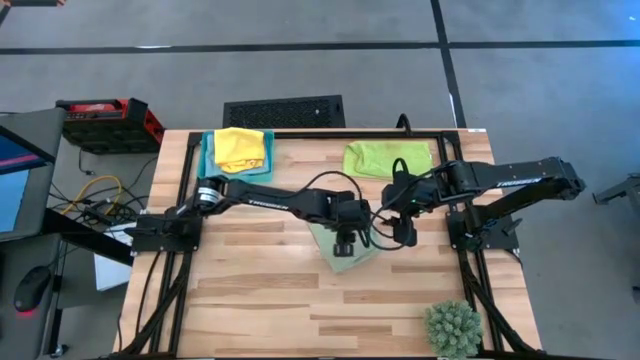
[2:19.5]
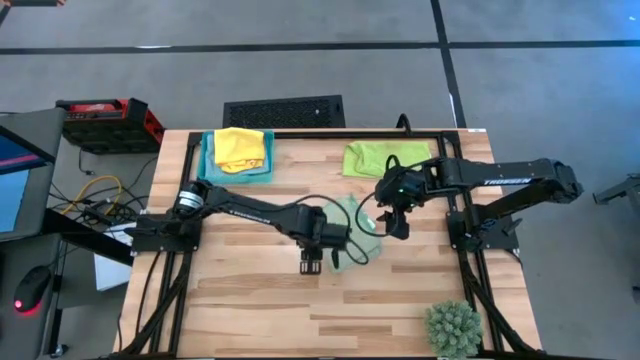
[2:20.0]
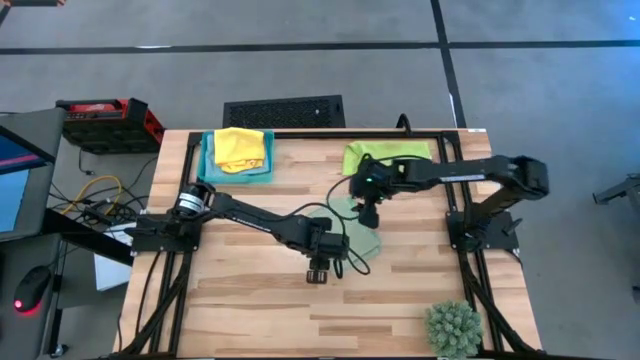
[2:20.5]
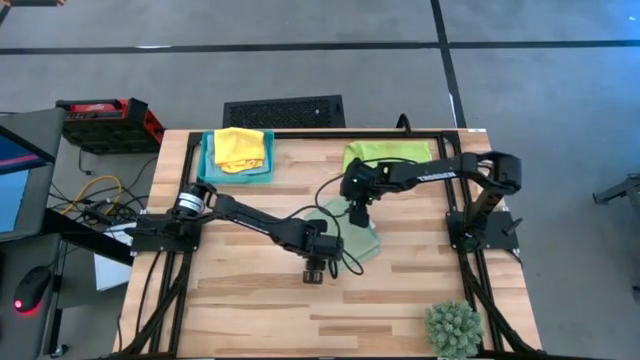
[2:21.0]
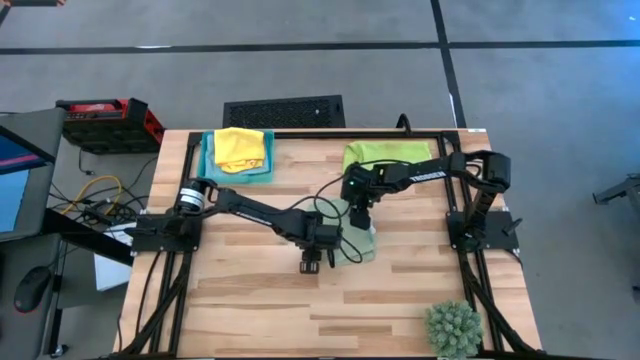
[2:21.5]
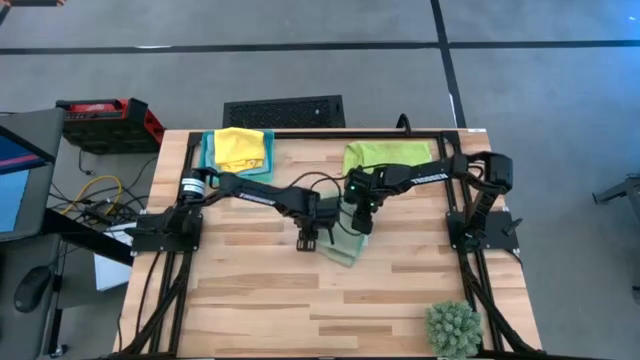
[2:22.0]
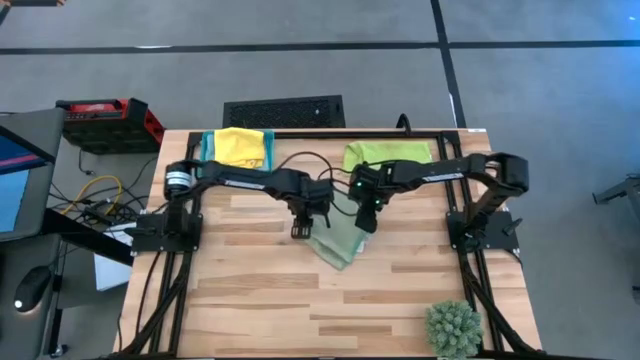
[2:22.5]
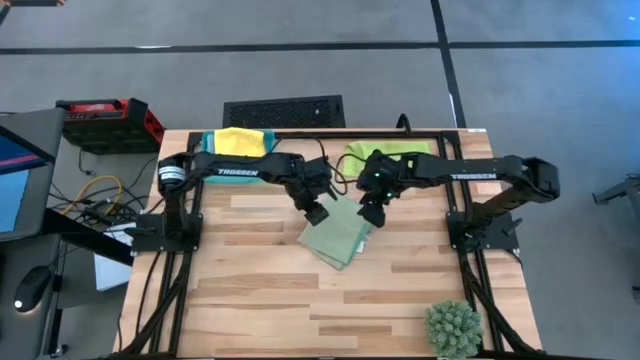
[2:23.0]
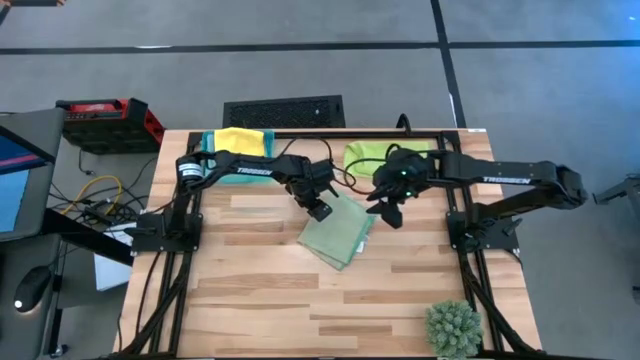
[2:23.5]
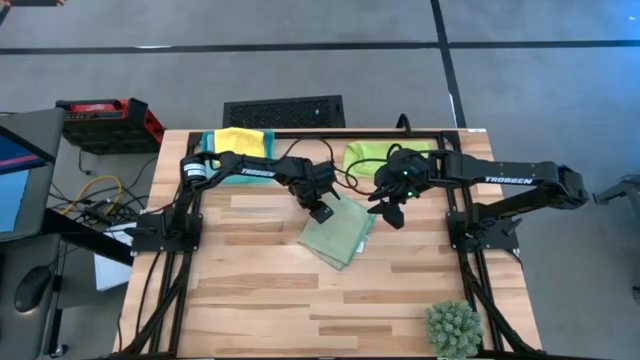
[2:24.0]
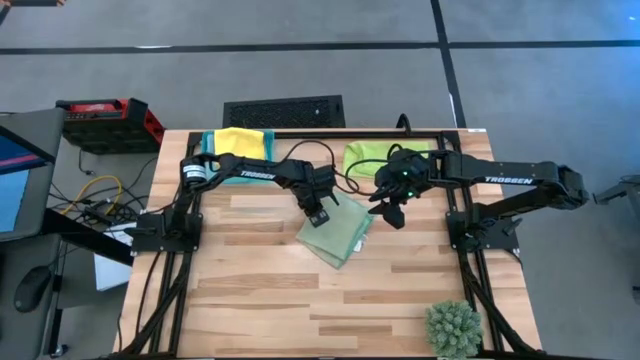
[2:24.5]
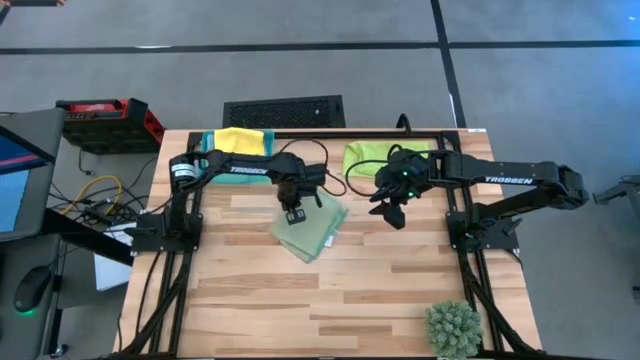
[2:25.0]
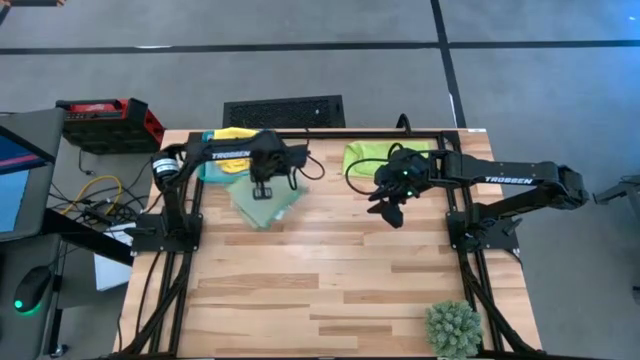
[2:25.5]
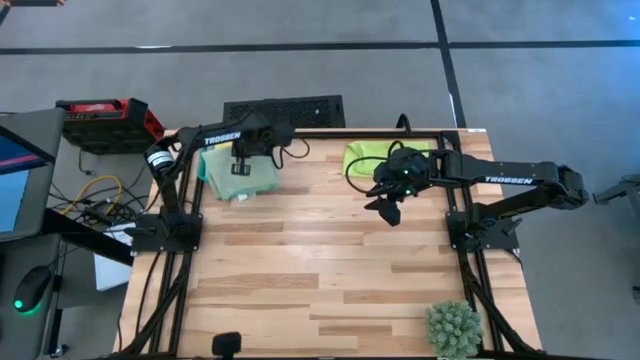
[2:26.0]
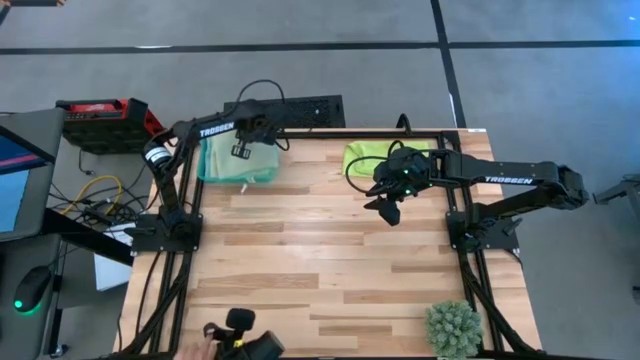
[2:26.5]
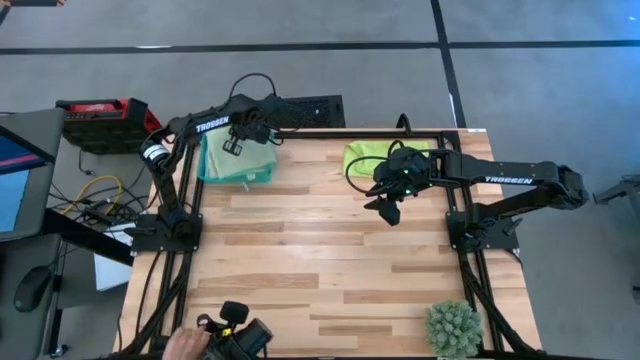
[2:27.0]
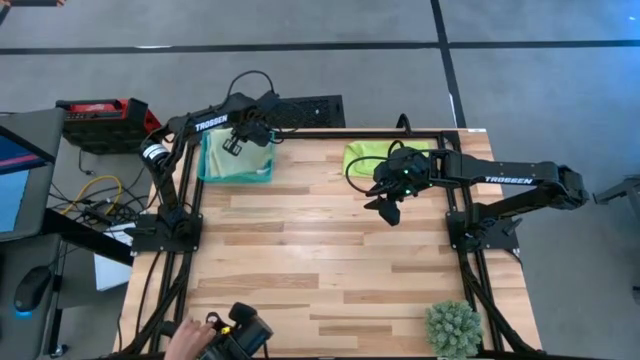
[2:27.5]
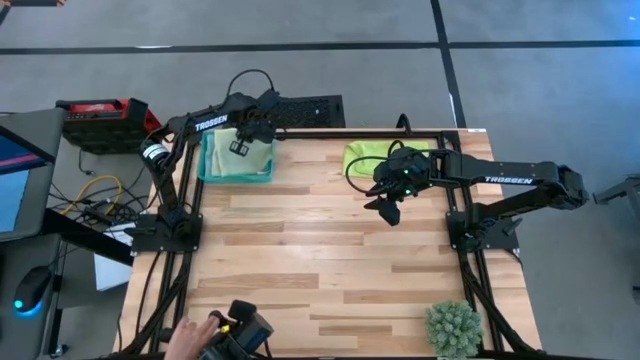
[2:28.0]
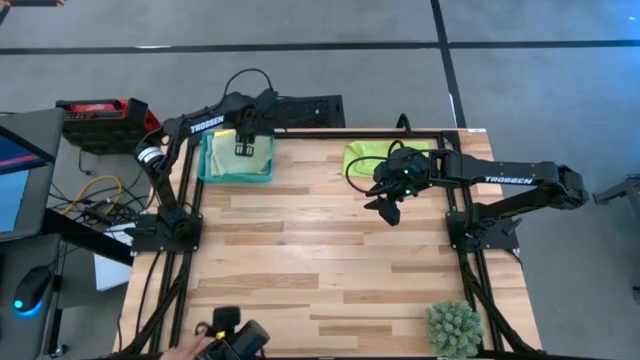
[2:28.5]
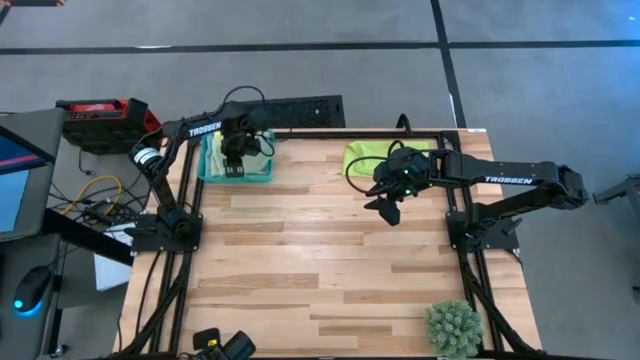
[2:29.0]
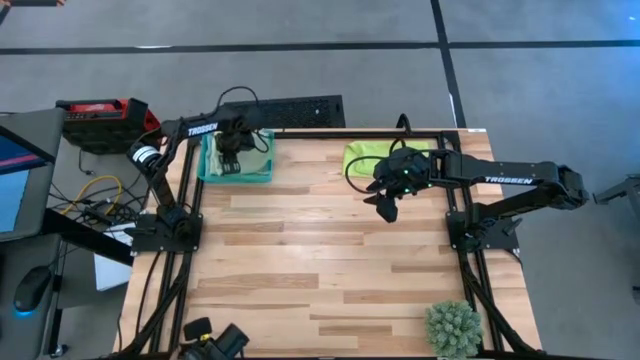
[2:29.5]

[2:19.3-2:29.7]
Task: Fold microfiber towels
Stack the folded green microfiber on top of the yellow microfiber towel

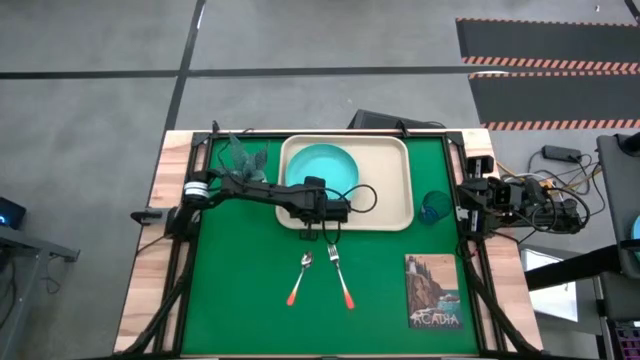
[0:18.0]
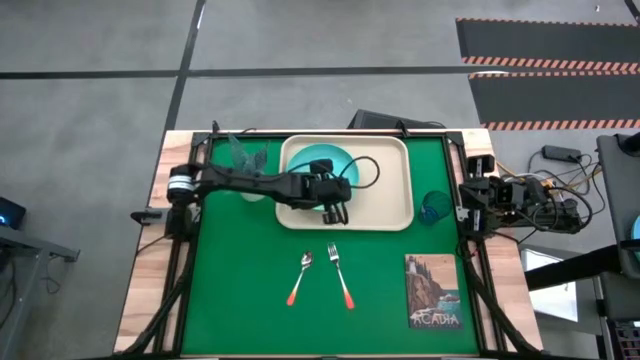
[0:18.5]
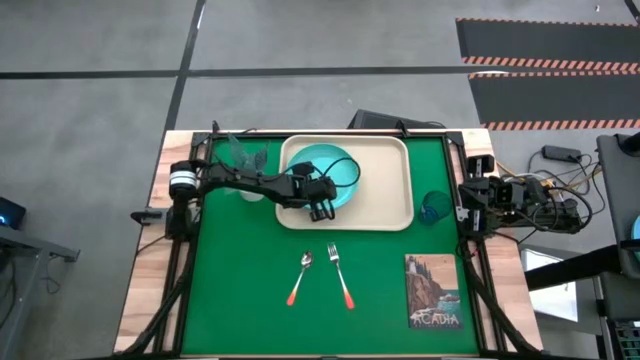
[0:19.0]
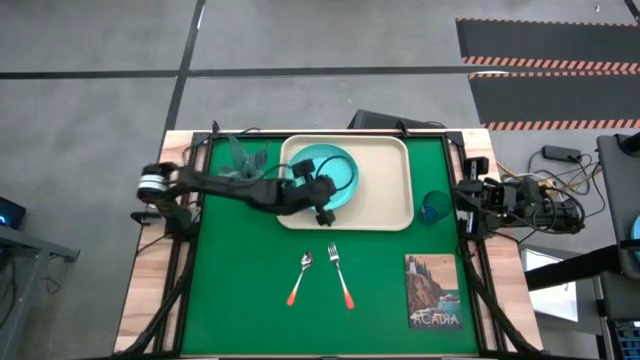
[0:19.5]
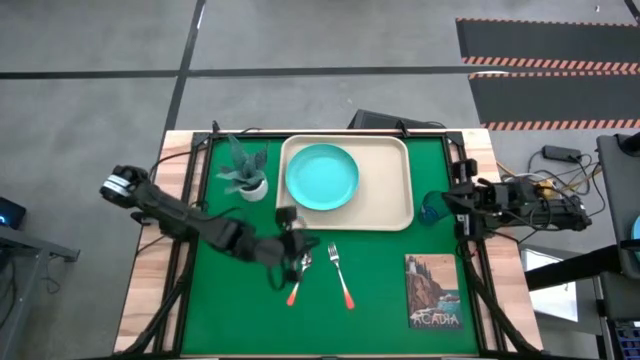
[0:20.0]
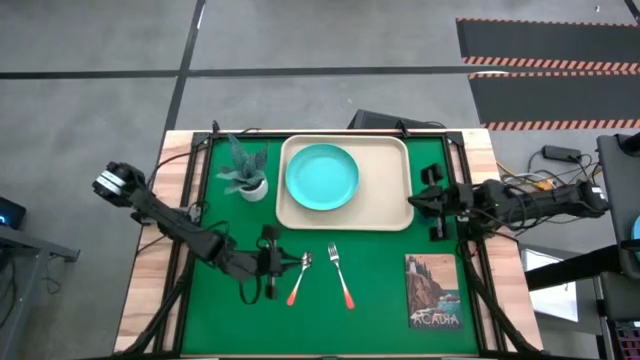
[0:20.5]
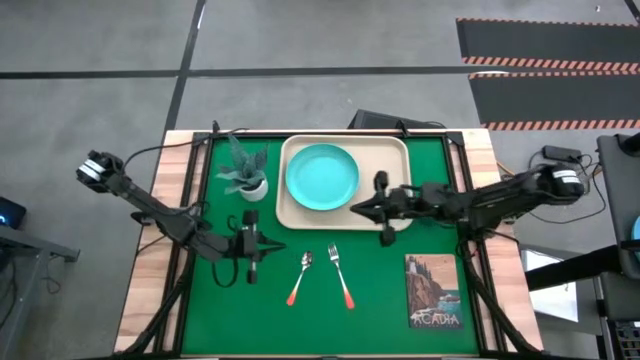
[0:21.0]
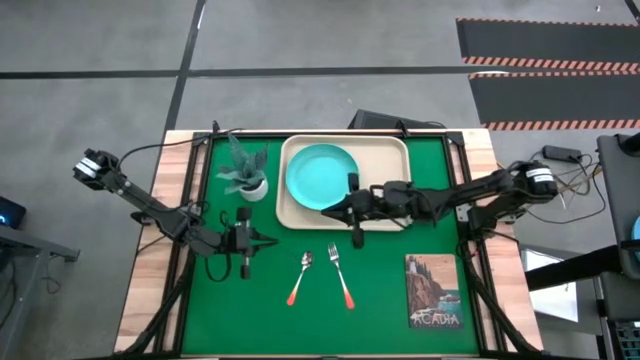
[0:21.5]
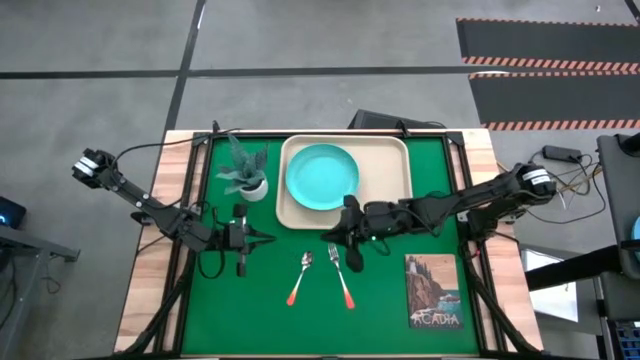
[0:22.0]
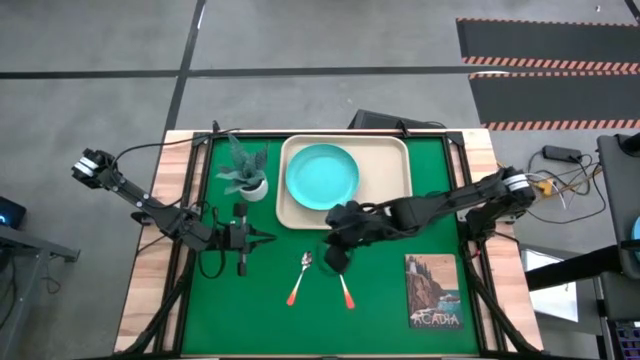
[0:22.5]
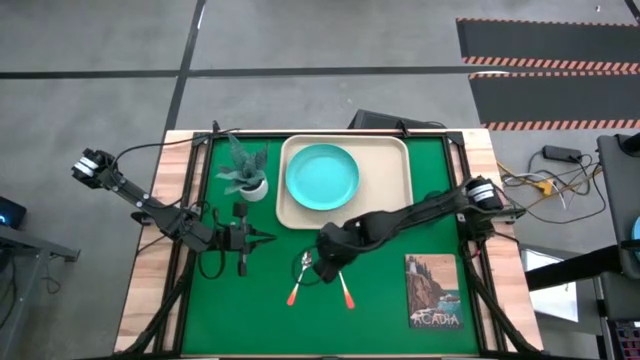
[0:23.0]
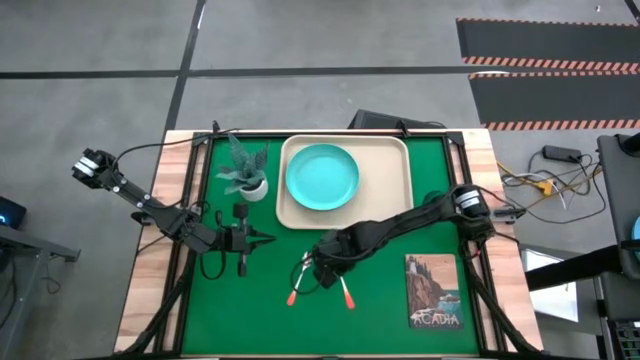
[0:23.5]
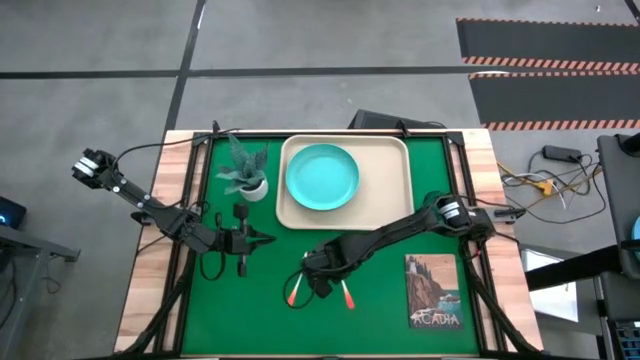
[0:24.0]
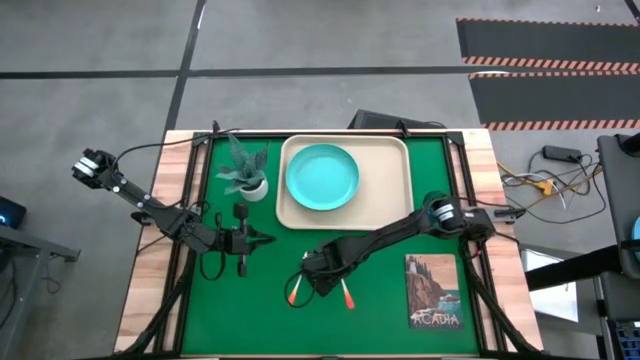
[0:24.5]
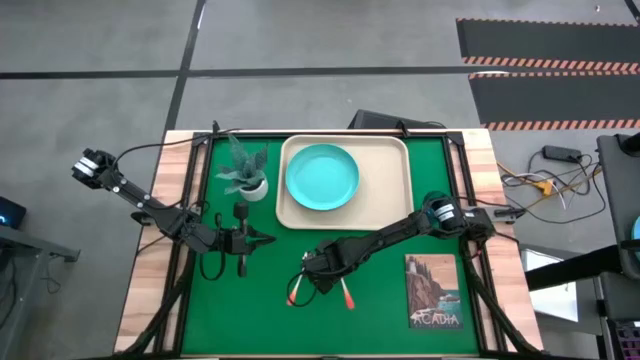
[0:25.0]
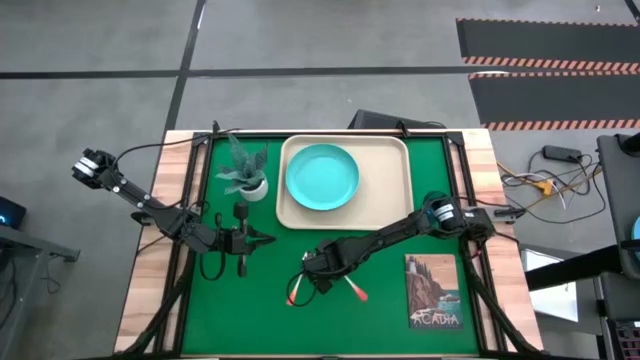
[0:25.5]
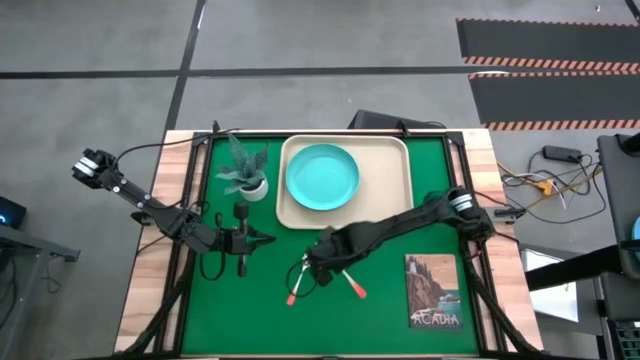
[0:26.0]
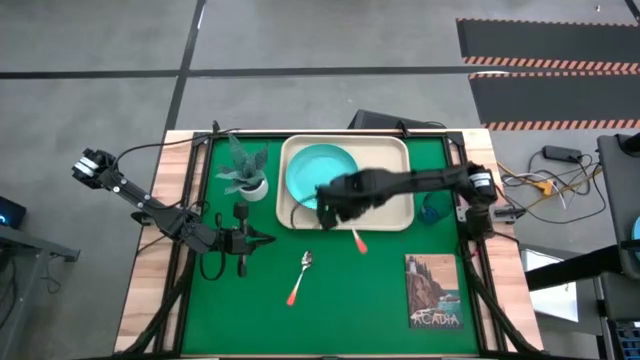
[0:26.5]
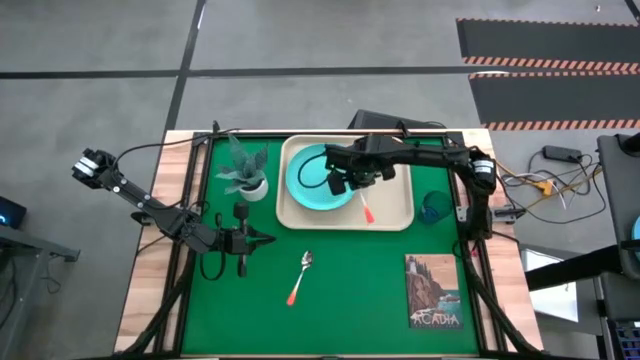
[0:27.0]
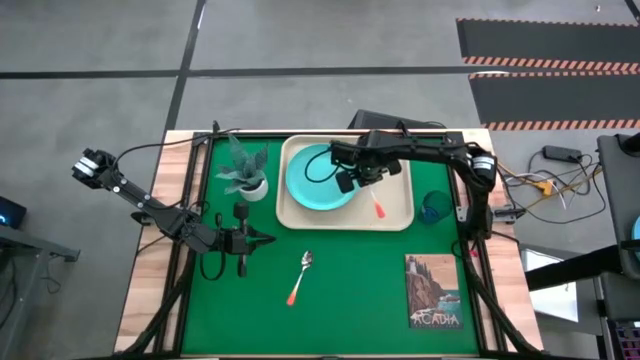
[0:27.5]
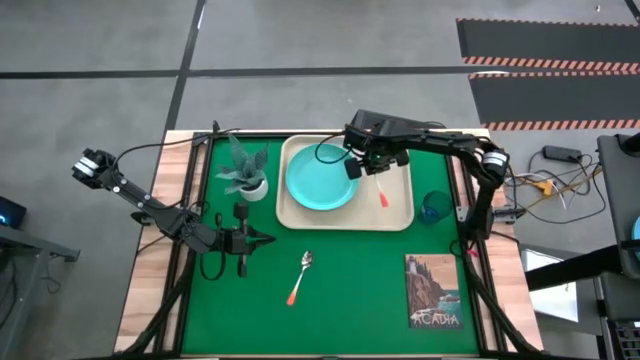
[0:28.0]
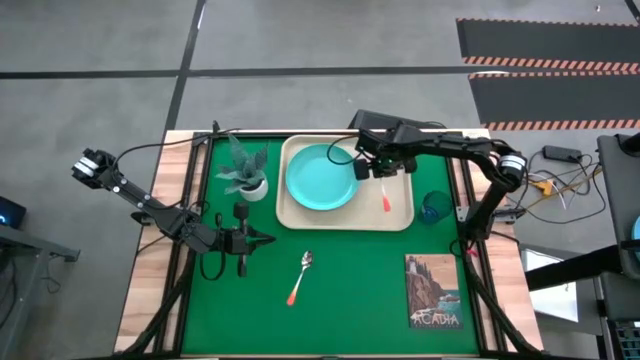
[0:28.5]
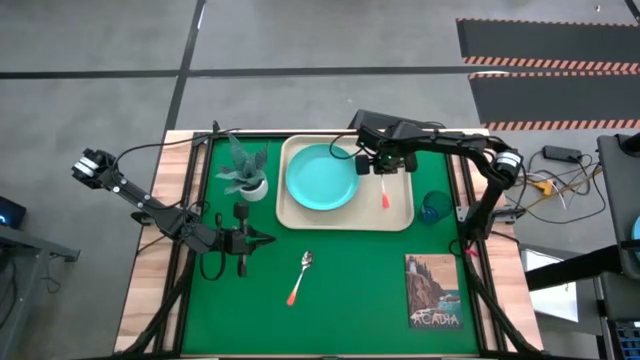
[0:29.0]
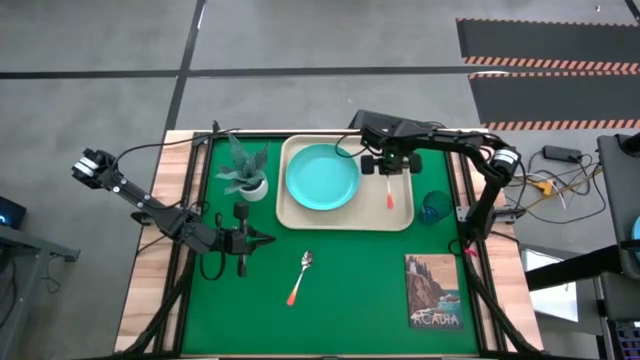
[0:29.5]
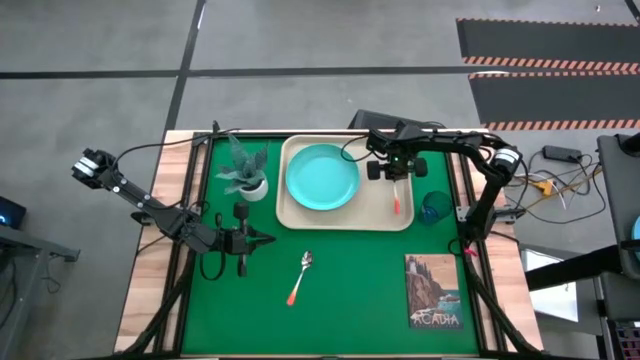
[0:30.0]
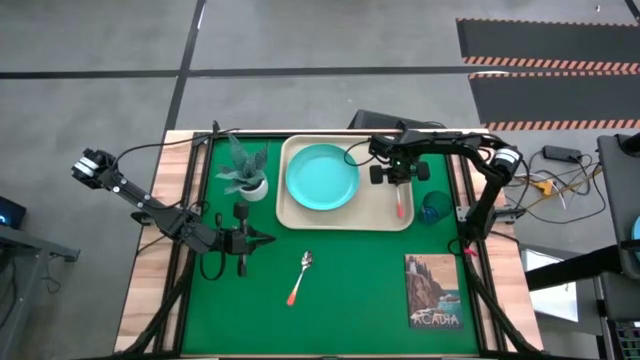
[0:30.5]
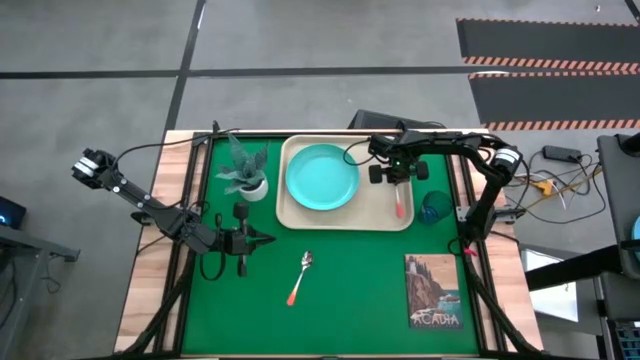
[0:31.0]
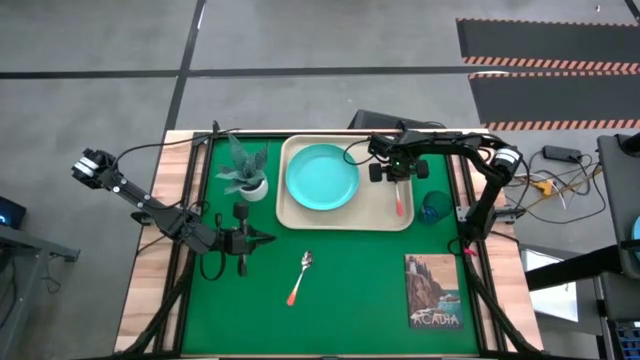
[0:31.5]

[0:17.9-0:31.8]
Task: Pick and place plate/cup/fork/spoon on tray
Put the orange fork on the light white tray to the right of the blue plate
